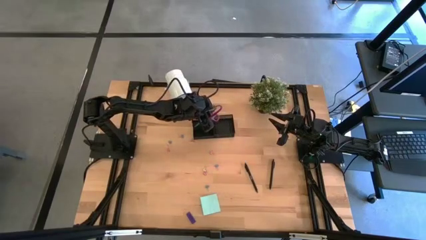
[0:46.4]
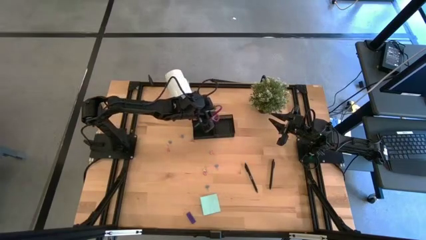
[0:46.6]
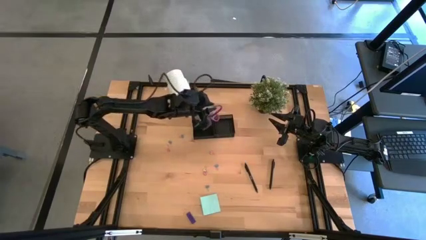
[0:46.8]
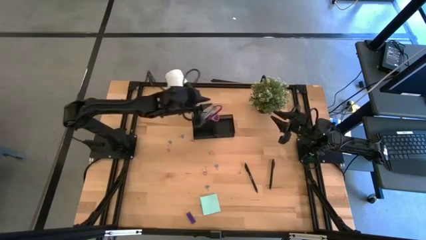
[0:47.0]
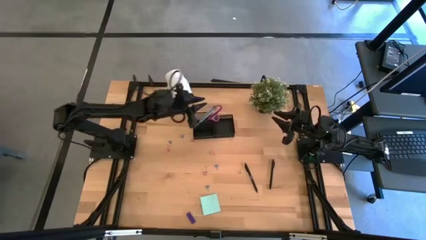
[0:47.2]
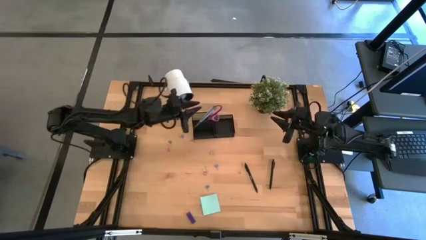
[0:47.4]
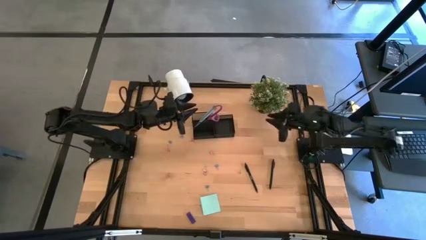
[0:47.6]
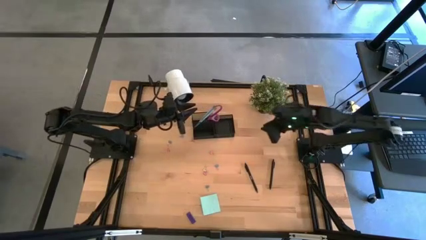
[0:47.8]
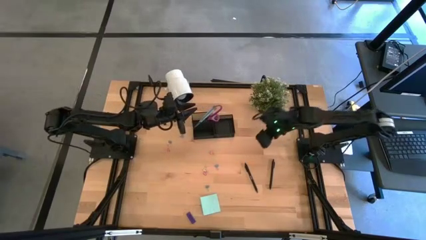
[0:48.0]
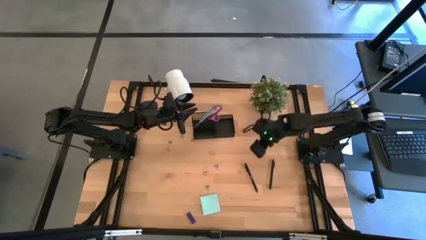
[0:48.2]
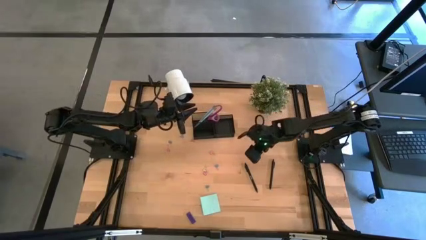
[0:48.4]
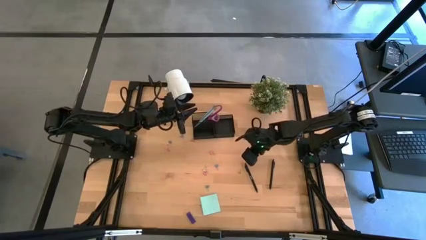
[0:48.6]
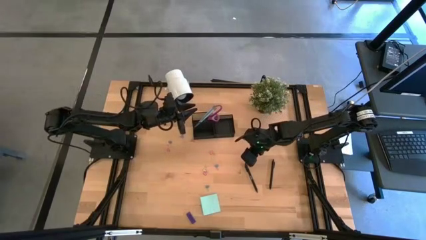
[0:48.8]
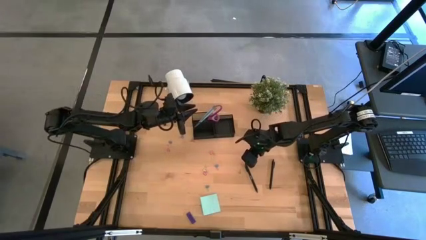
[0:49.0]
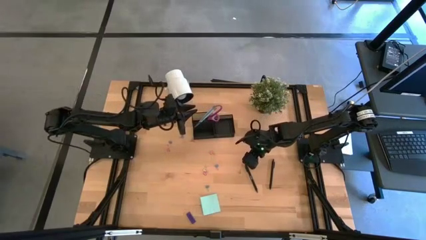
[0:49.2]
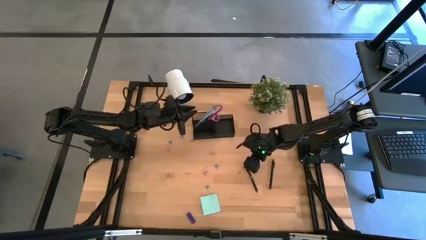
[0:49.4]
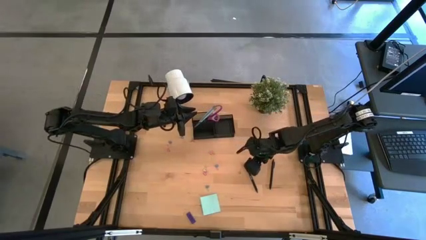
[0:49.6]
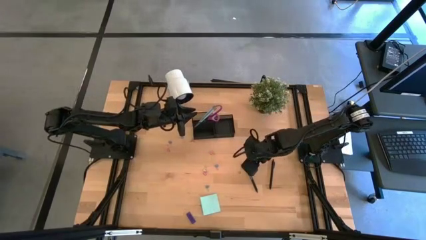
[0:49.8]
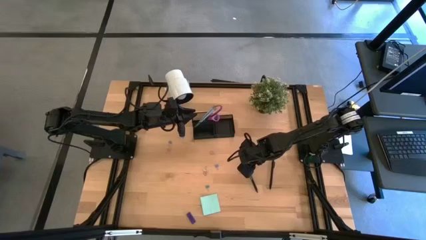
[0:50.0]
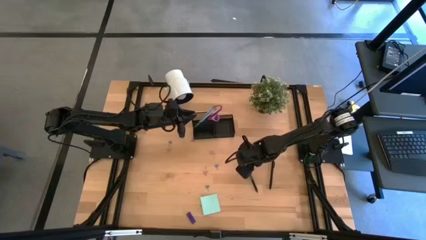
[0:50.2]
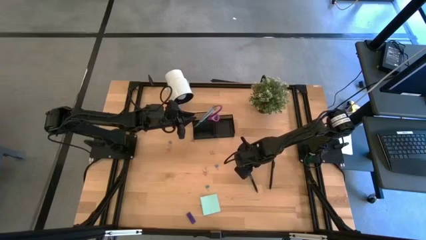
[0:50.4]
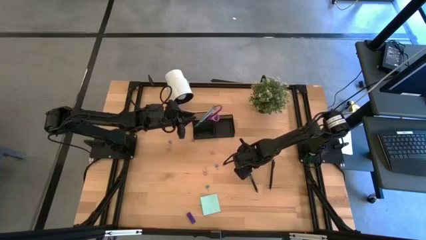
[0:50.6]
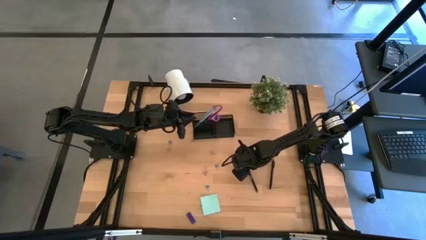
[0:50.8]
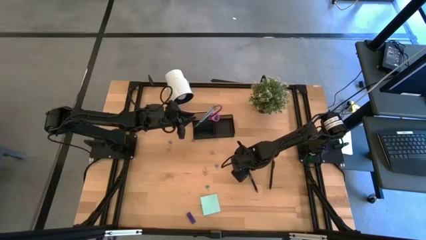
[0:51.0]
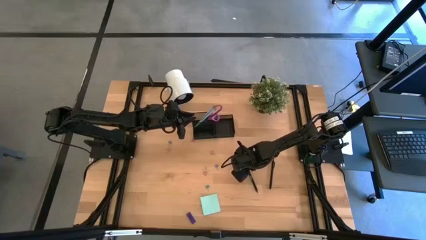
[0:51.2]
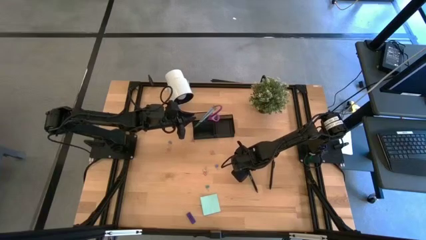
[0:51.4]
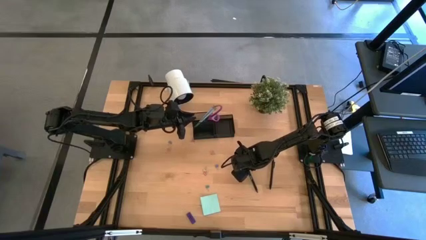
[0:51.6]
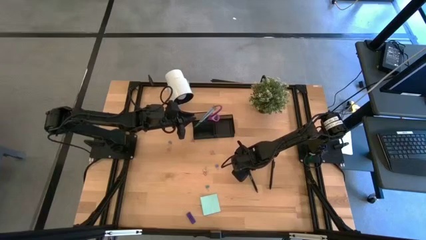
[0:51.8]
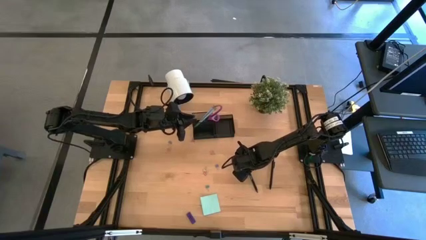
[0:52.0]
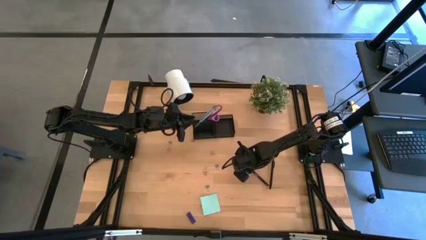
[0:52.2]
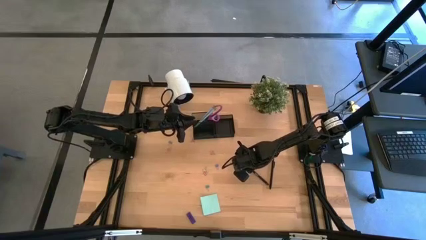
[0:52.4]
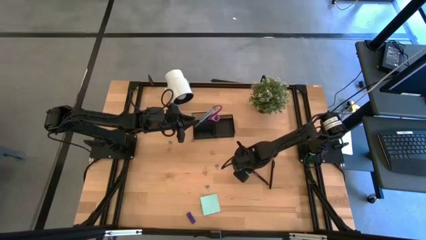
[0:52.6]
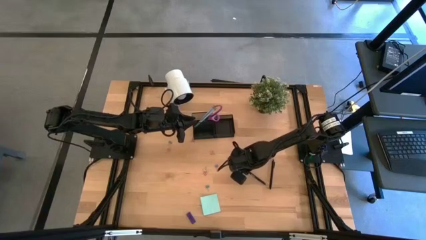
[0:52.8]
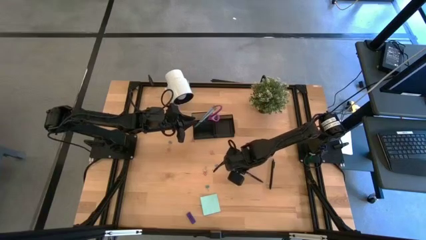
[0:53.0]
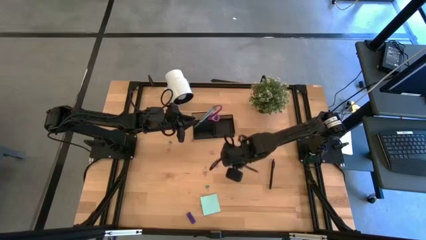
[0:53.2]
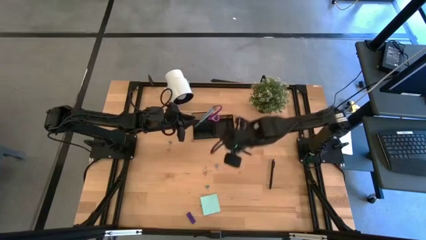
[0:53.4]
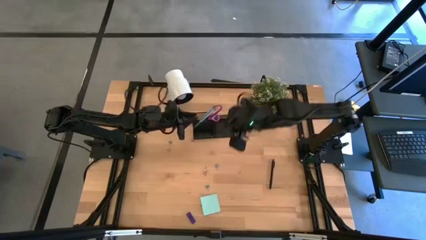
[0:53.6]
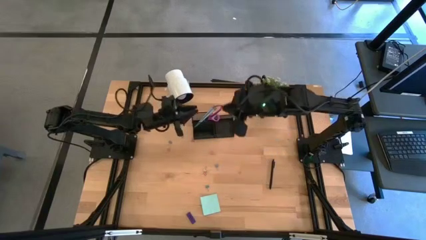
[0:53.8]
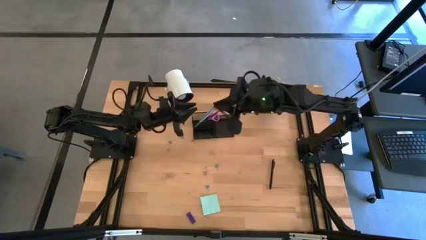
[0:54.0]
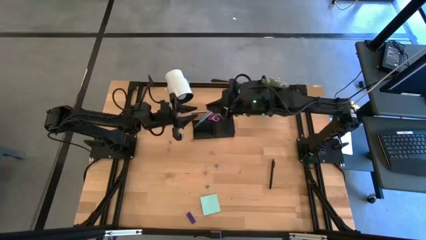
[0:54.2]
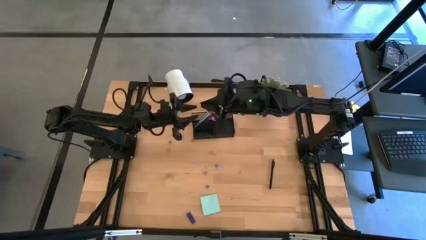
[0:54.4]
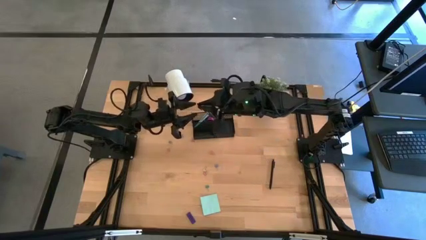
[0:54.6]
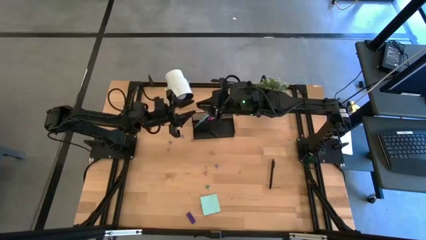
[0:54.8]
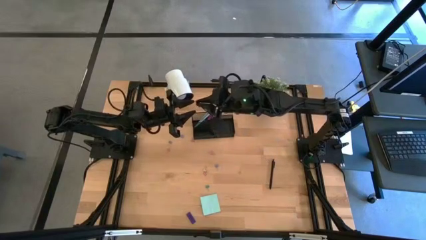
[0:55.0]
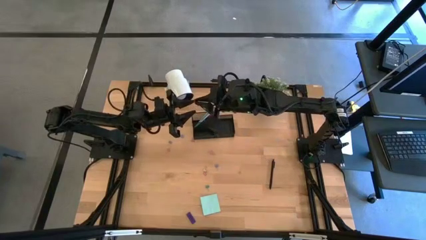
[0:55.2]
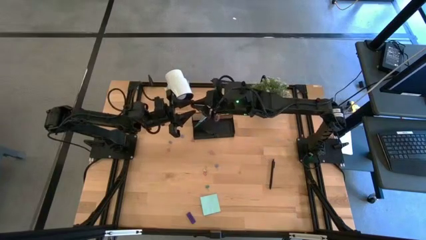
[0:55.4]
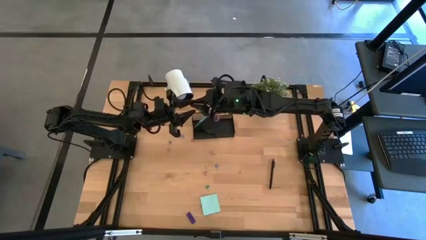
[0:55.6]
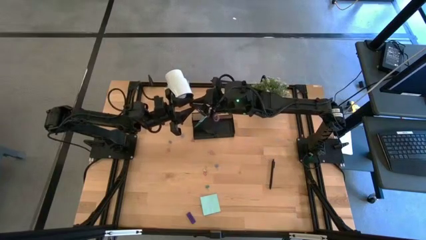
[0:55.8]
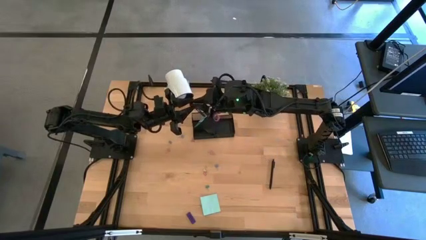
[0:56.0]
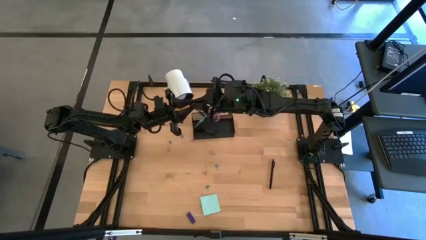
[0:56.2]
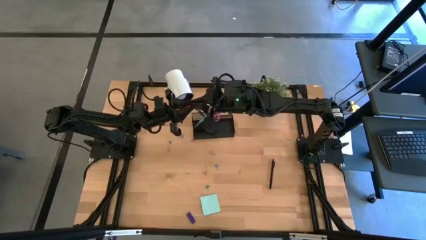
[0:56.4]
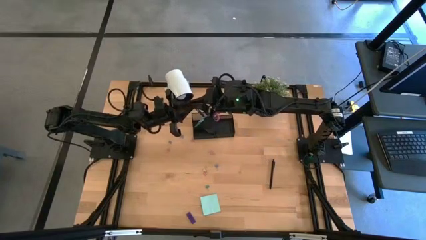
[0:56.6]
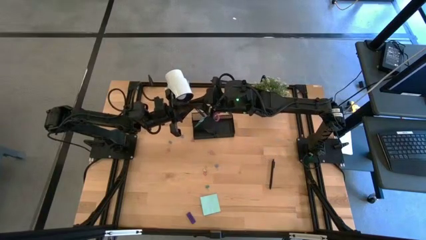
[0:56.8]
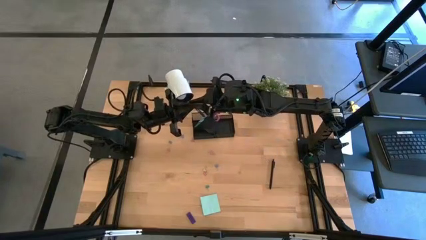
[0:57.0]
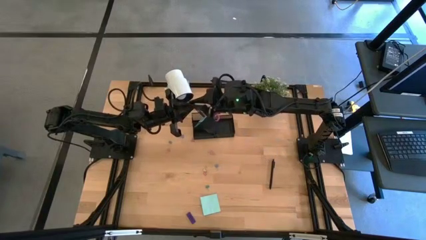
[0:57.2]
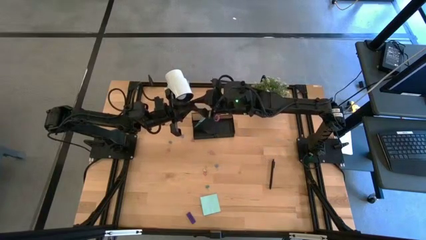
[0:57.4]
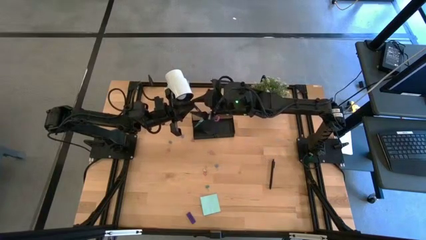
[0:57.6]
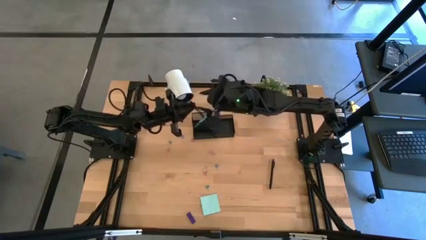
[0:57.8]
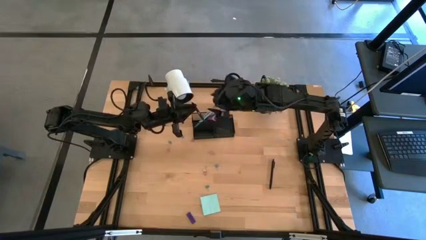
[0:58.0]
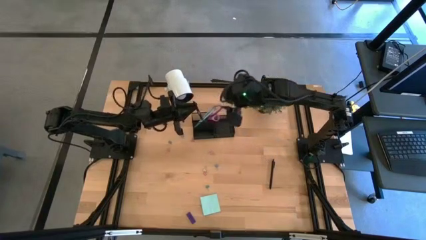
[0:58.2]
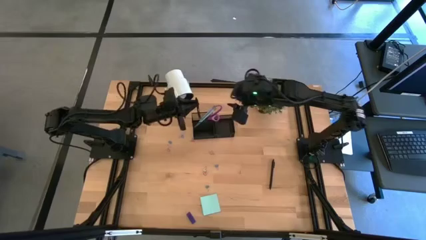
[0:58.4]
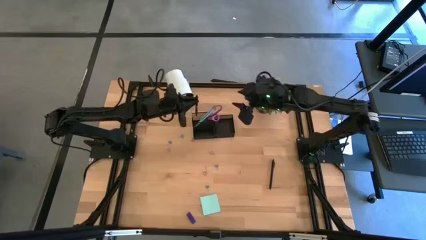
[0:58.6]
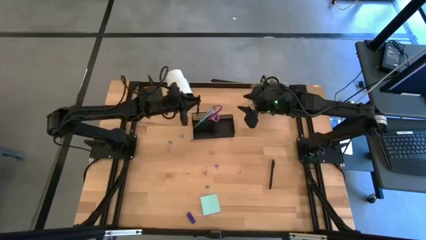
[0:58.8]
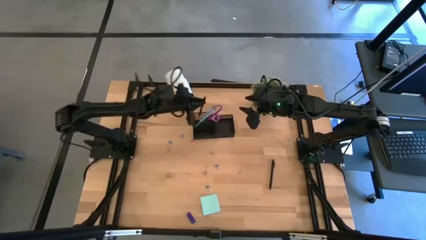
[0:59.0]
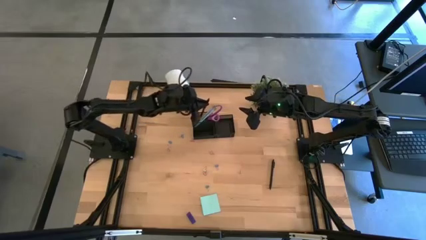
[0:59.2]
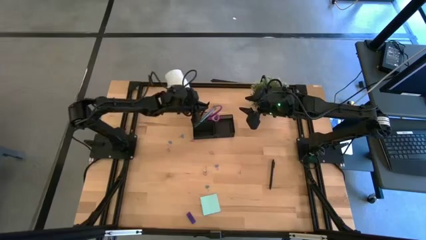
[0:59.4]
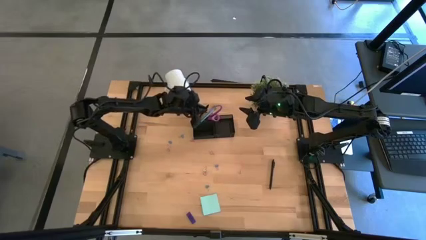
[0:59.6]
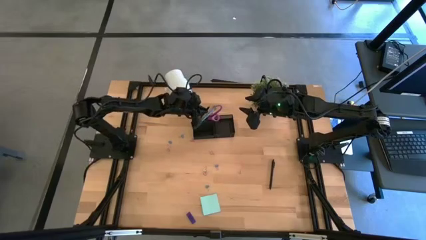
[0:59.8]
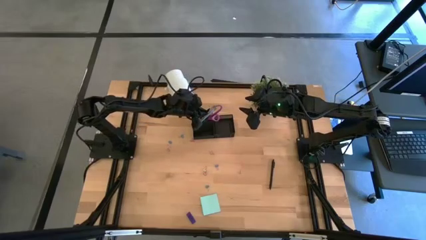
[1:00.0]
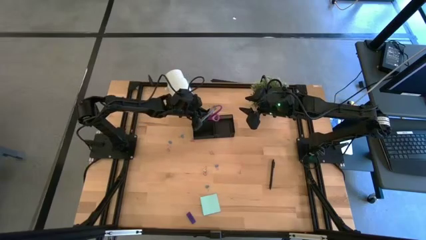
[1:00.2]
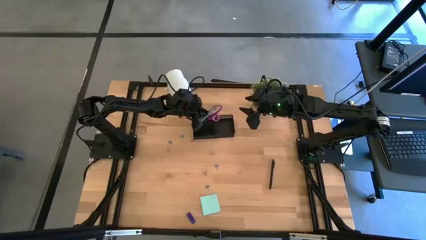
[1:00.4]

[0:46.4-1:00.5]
Task: Pick and place office supplies into organizer
Put the black pen into the black desk organizer

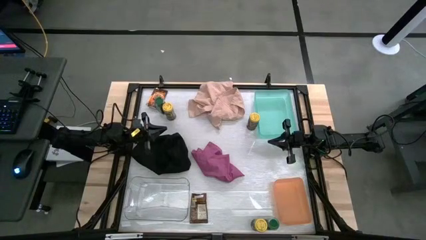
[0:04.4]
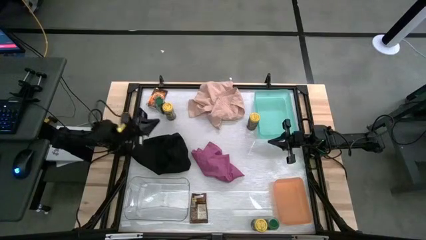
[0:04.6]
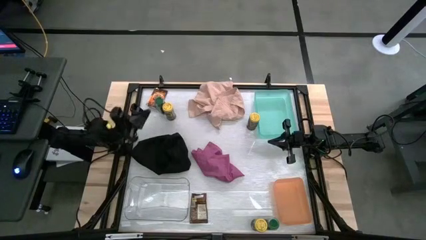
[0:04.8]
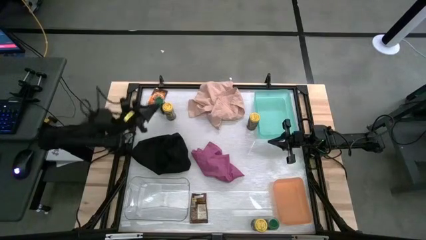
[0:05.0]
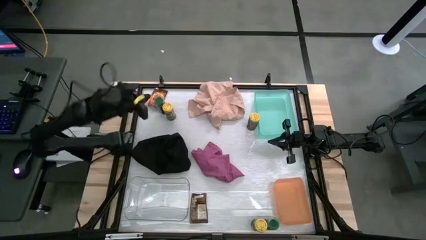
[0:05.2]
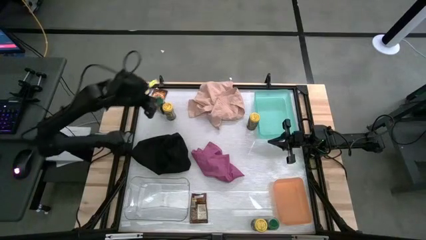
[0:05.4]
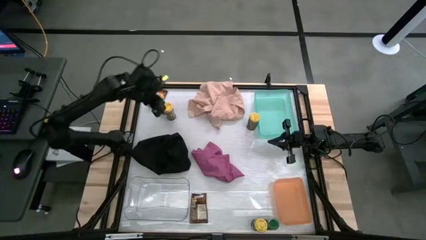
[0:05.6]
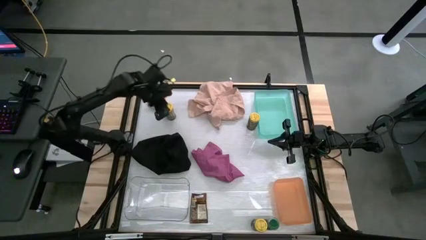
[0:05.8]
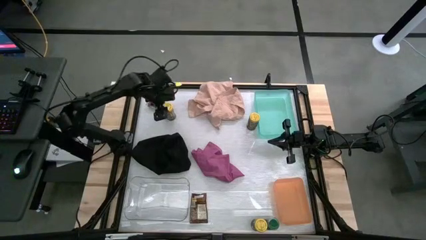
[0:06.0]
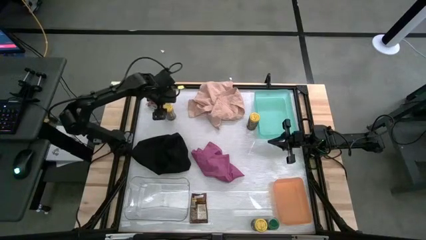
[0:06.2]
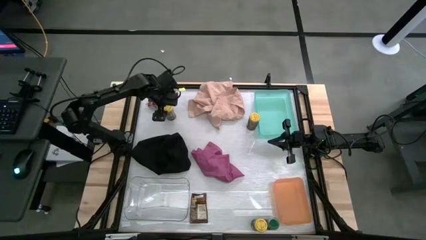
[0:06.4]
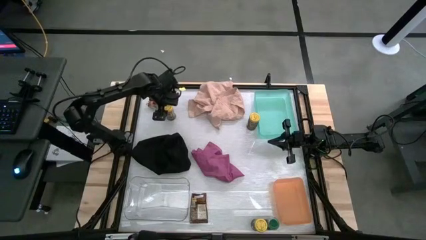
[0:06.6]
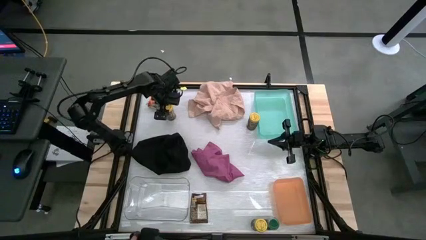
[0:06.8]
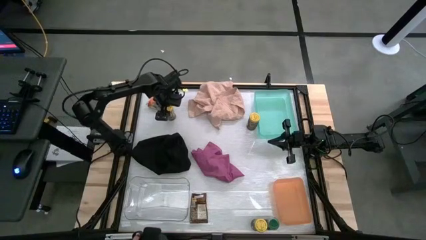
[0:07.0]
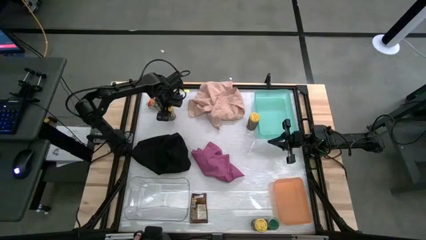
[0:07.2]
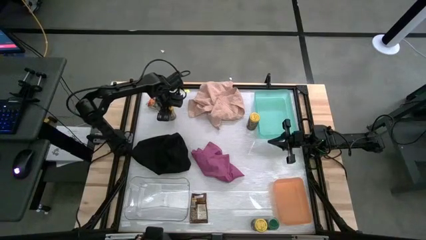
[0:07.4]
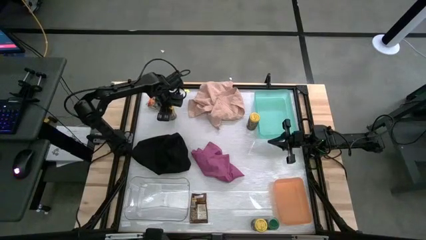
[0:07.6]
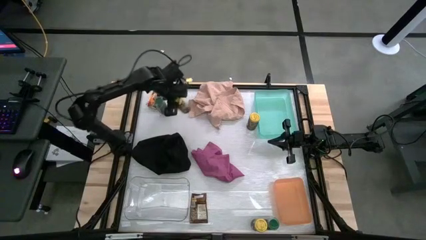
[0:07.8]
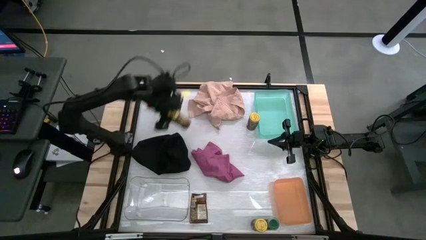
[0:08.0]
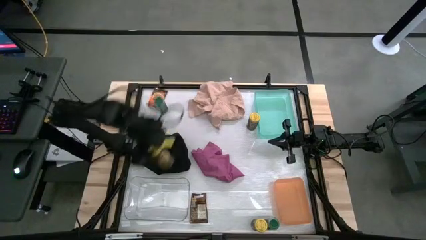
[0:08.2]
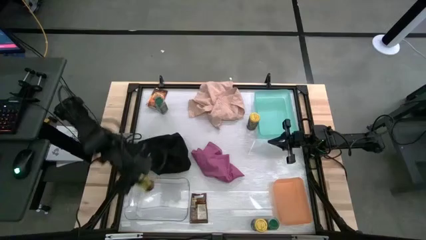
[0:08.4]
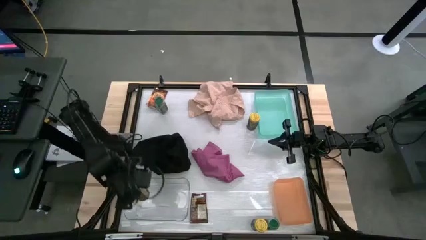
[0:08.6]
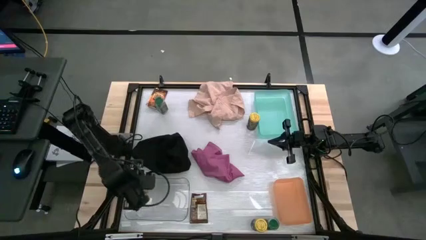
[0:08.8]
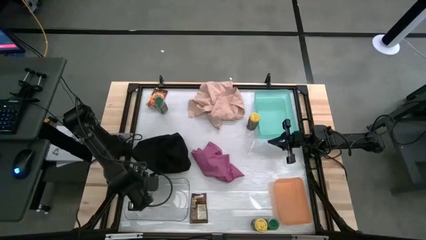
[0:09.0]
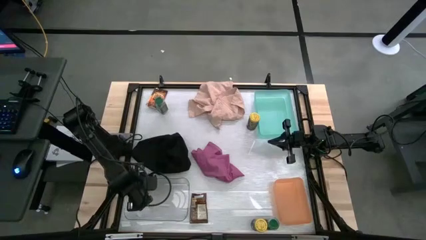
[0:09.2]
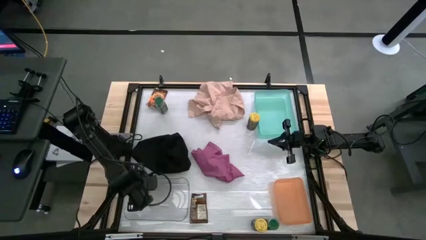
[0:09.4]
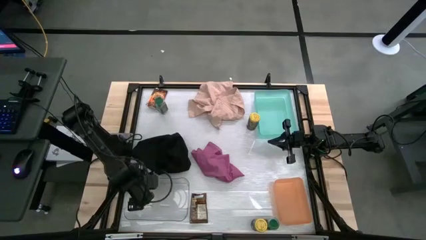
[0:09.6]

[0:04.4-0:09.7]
Task: Sort spices by type
Put the top left yellow seasoning bottle into the transparent bin
